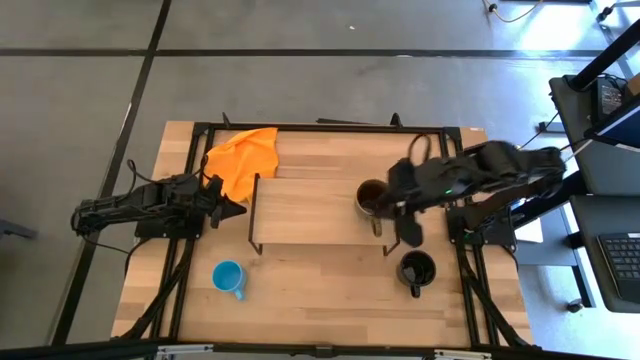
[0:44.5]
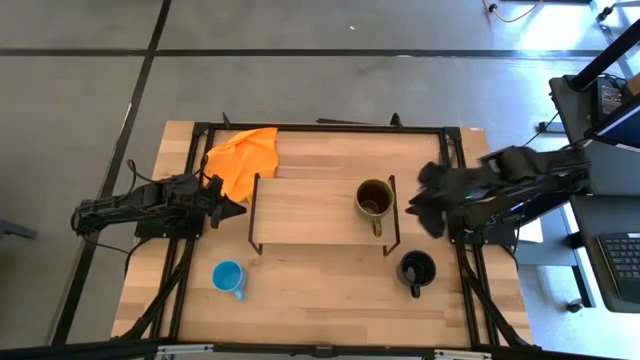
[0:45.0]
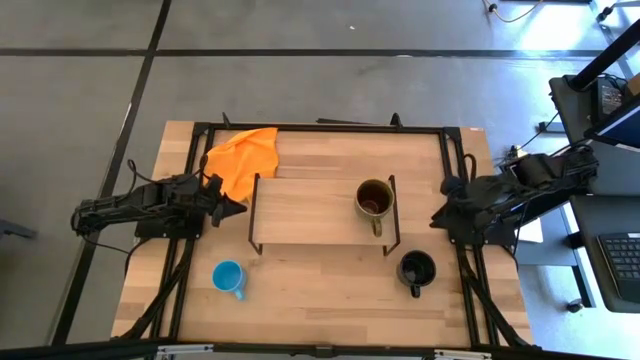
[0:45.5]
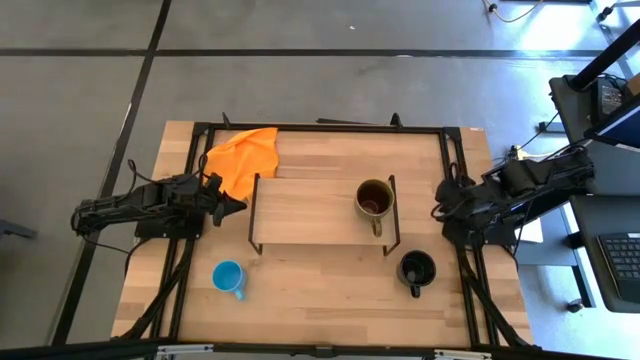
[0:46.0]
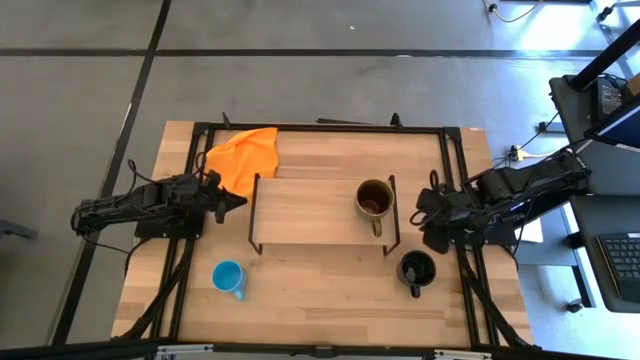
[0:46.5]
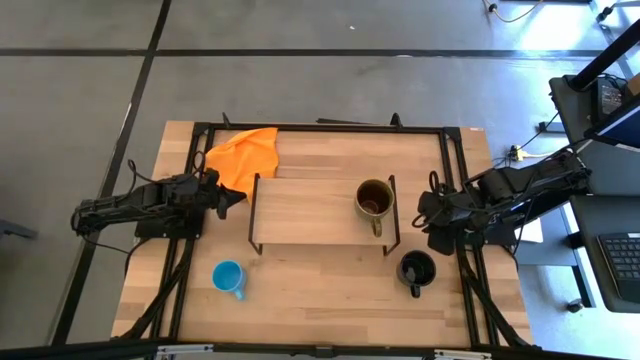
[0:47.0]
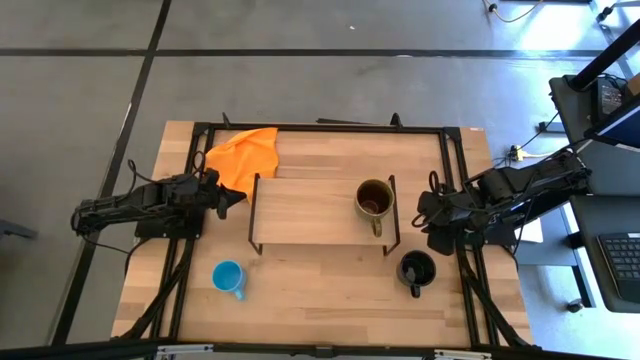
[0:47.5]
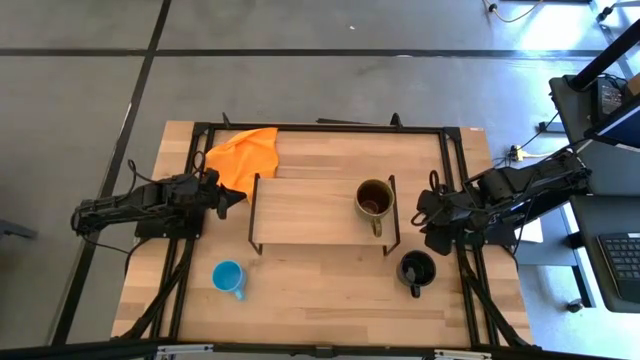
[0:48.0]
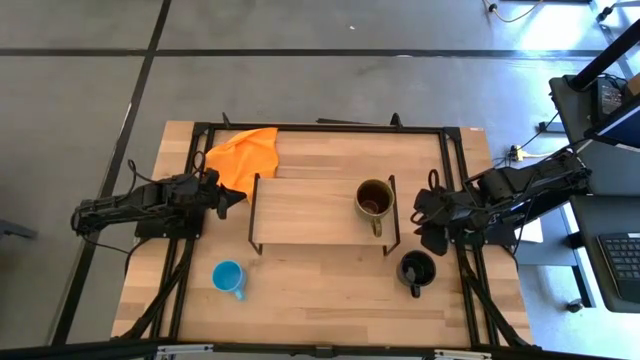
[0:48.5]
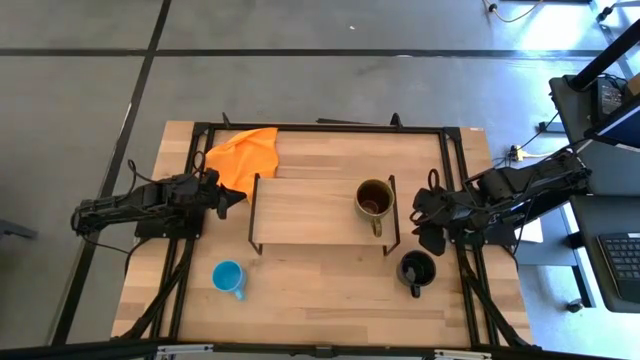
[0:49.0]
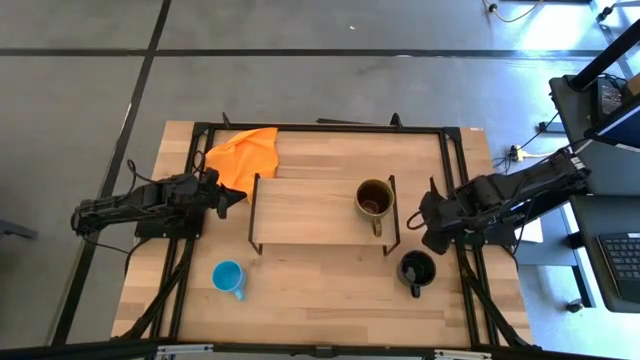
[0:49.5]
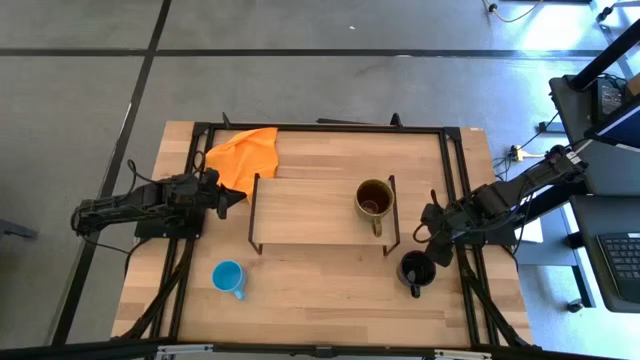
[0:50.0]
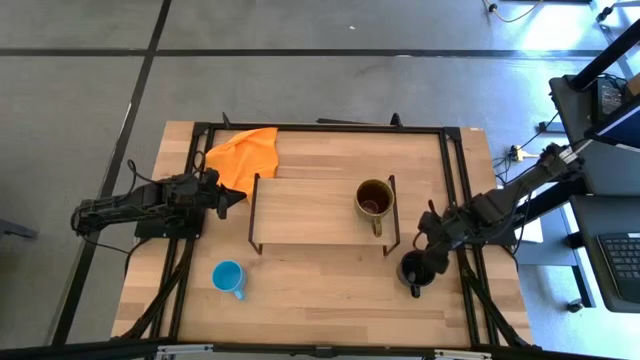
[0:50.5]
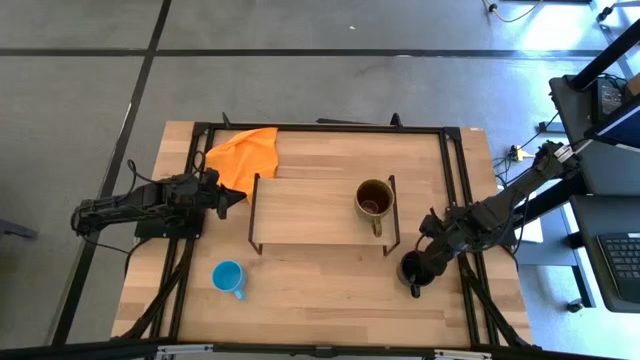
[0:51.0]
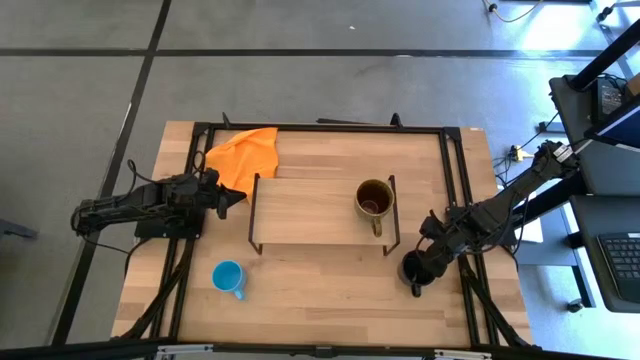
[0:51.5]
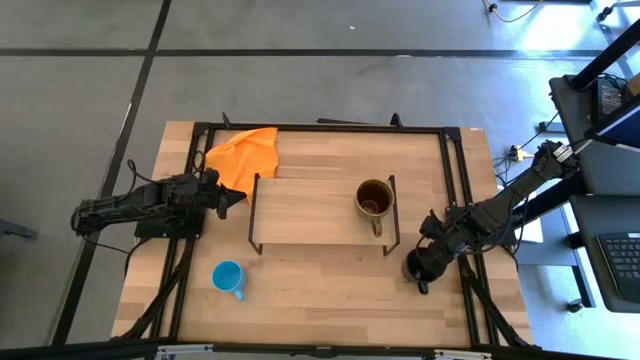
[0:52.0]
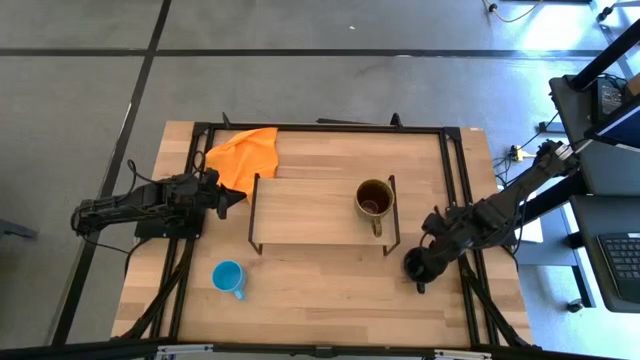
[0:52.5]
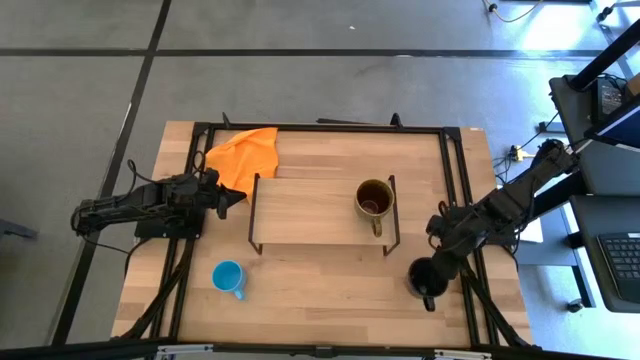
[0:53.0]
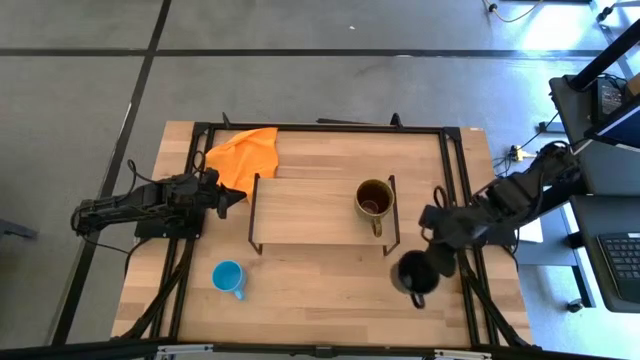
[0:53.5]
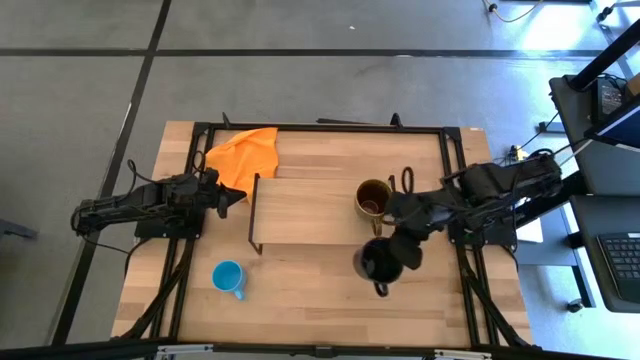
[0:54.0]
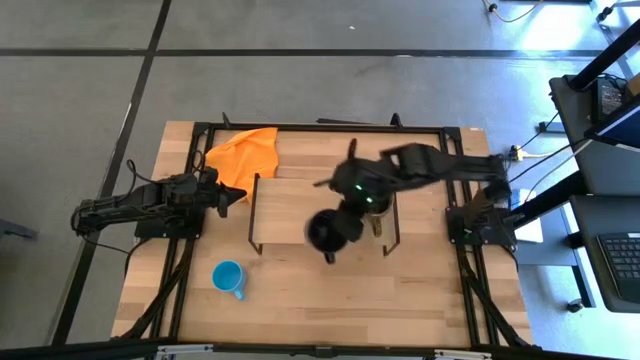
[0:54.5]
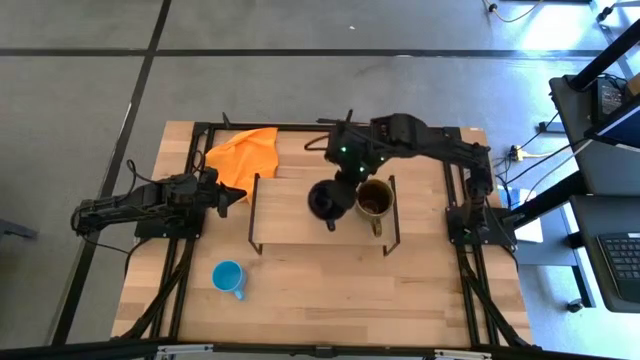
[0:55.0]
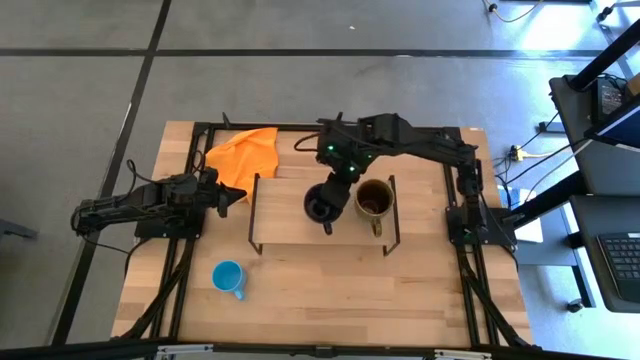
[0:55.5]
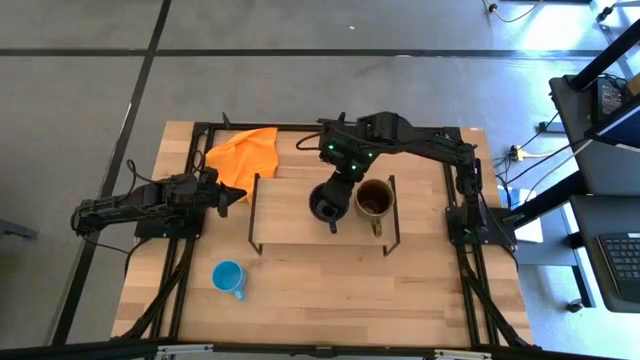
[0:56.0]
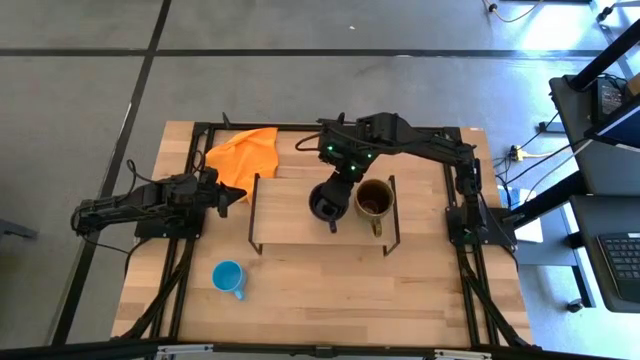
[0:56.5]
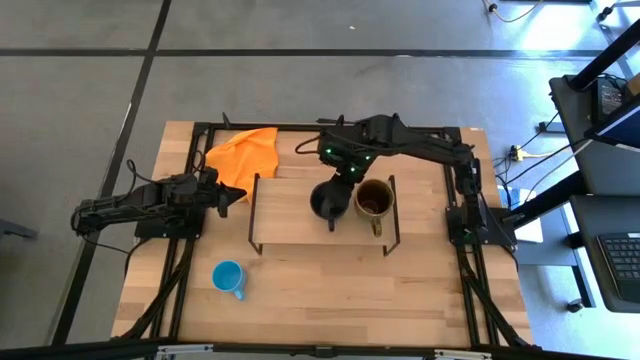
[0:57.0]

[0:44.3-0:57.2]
Task: Stack small to large cups/mugs on shelf
Put the dark blue mug on the shelf

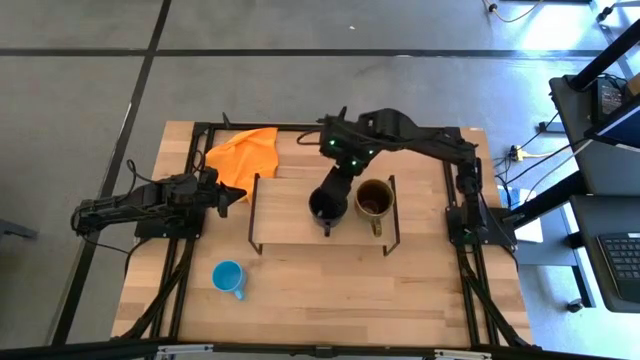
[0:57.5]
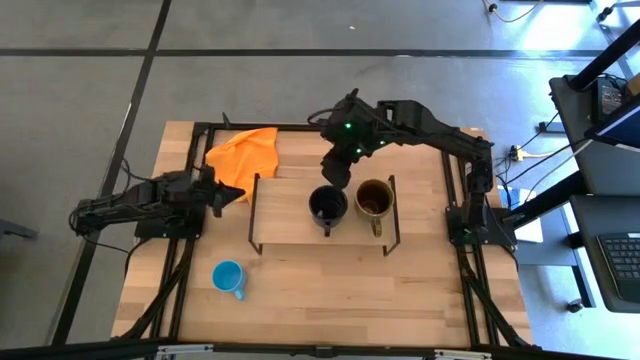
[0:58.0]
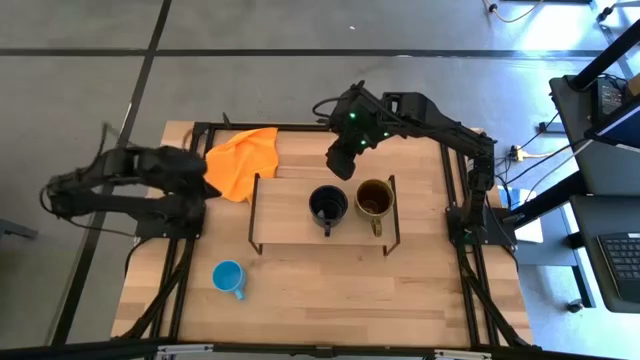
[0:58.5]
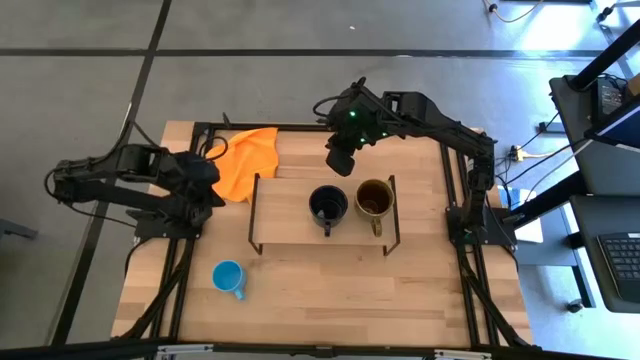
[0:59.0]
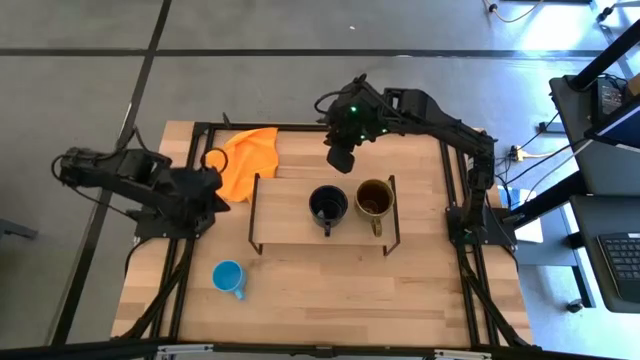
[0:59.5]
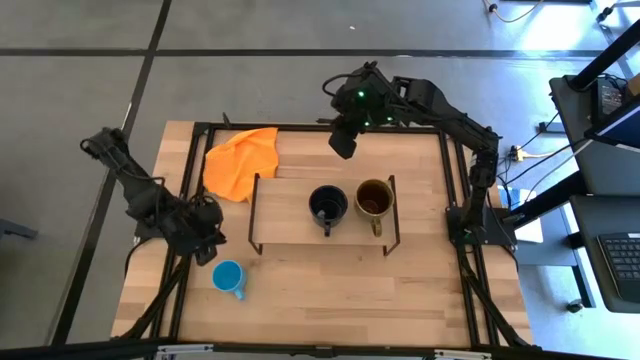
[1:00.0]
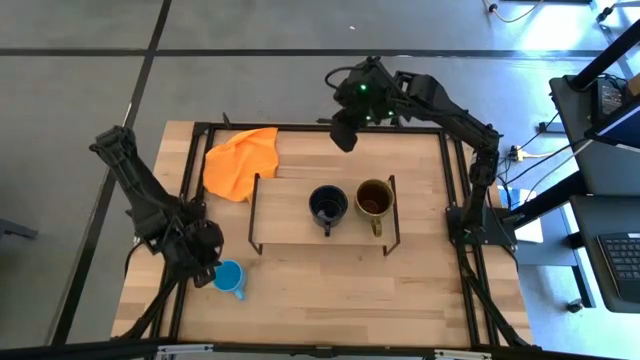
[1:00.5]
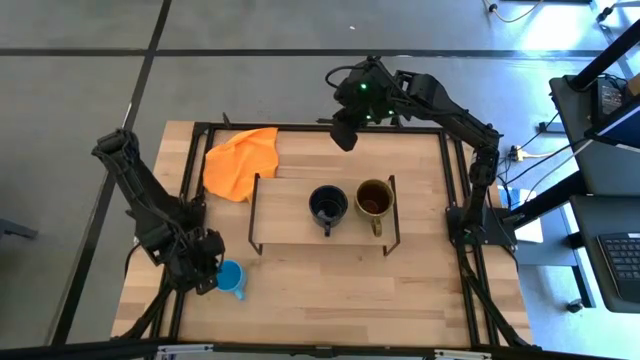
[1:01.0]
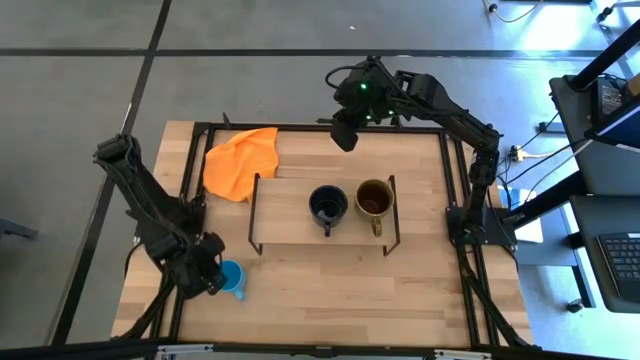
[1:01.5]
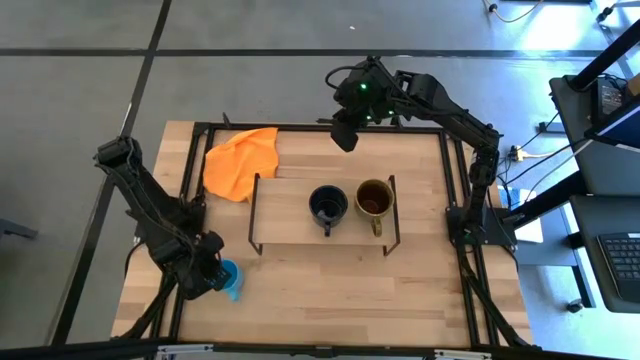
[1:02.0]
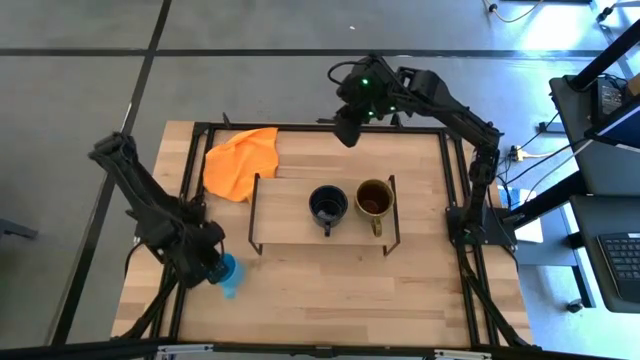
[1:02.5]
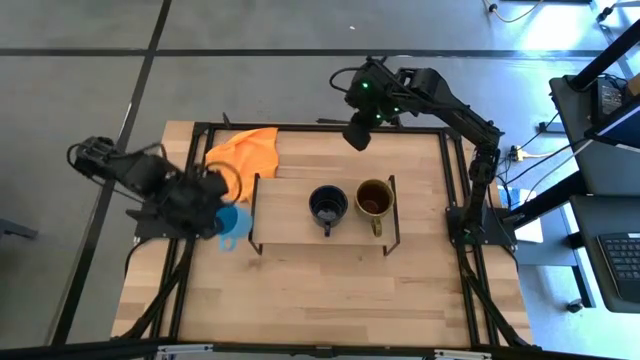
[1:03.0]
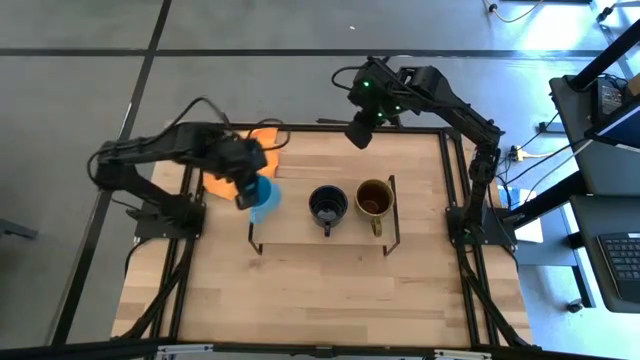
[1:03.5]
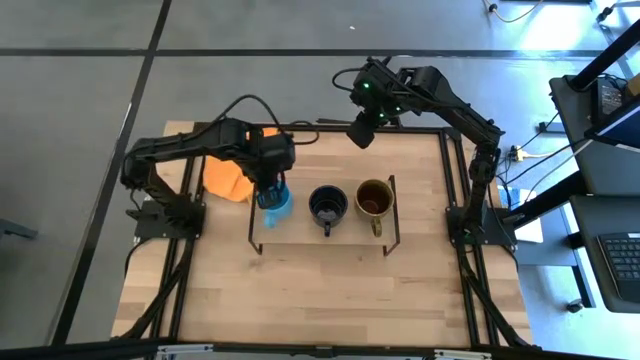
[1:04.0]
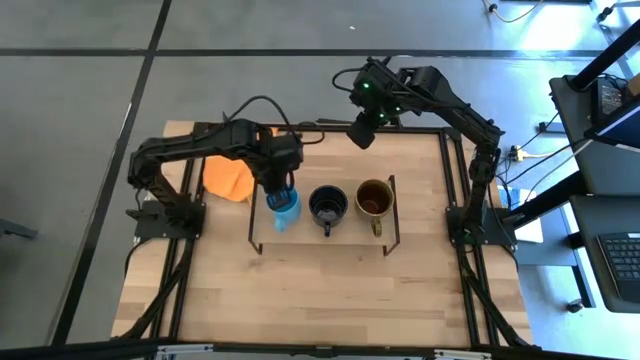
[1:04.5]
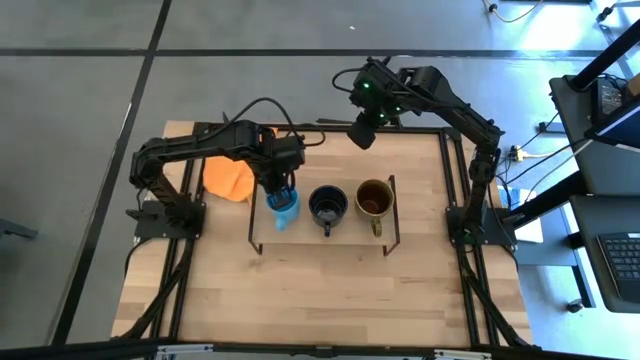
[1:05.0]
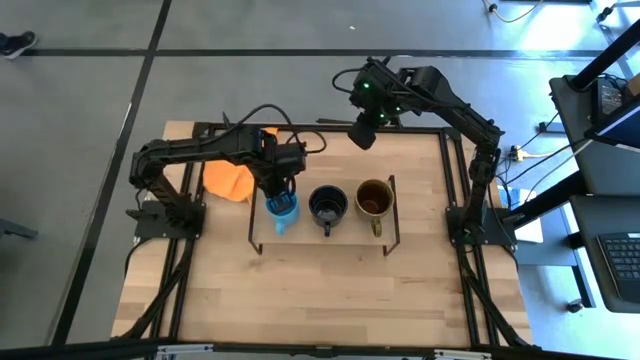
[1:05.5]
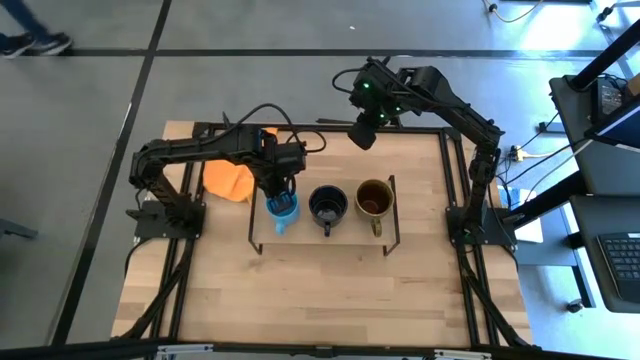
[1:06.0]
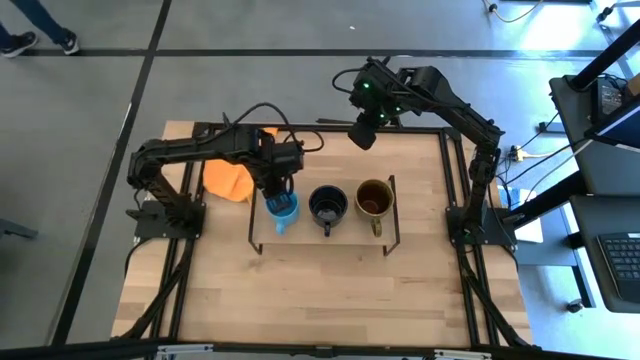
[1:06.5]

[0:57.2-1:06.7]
Put the light blue mug on the shelf
